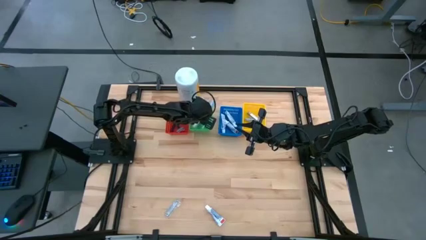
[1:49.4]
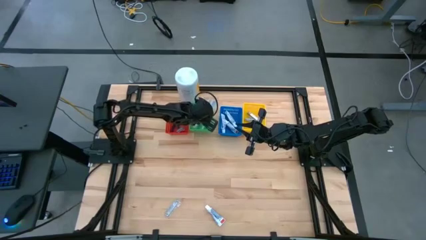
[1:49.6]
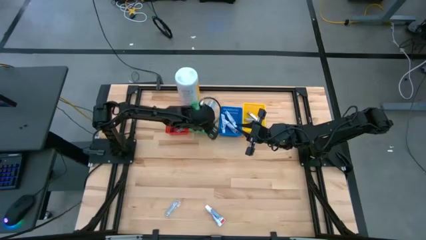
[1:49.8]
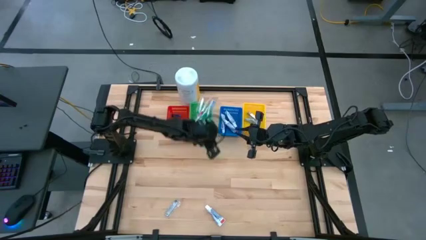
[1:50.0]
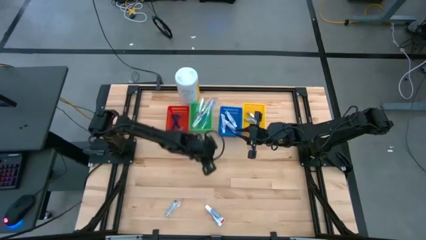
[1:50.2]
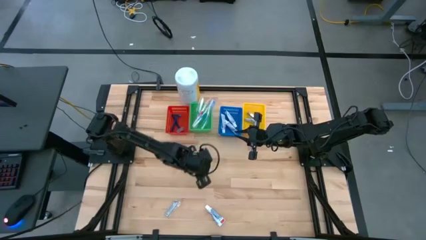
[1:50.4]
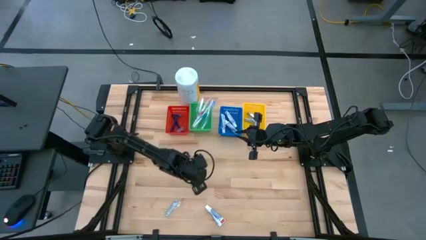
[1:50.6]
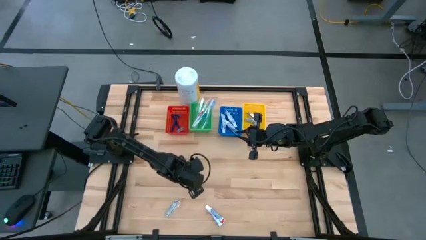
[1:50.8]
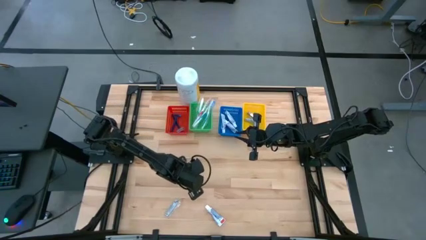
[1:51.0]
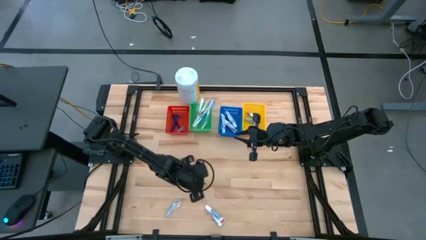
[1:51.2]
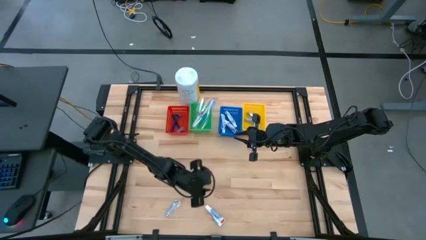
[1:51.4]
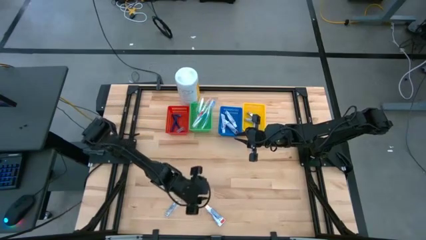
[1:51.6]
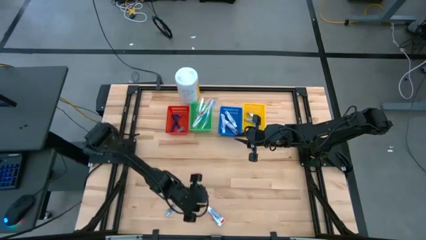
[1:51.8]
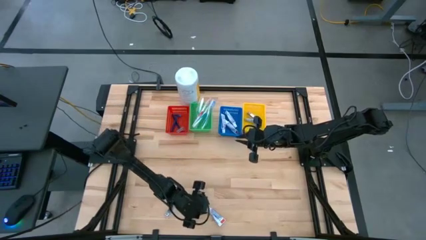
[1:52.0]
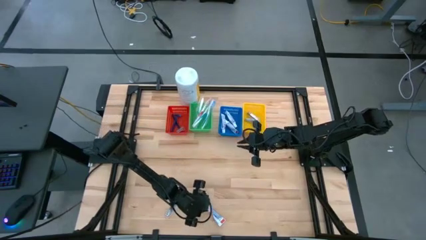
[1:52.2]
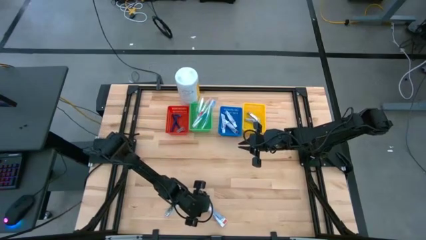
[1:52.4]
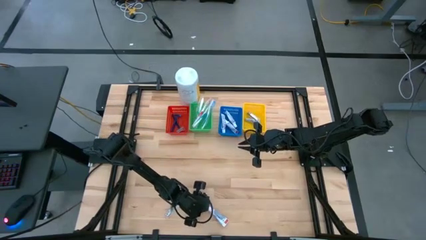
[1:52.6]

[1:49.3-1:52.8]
Task: Pick & Place Travel size toiletries
Put the white toothpaste into the blue bin

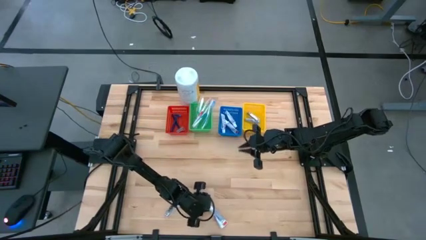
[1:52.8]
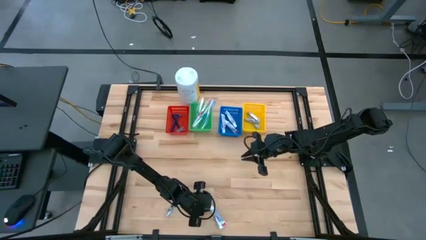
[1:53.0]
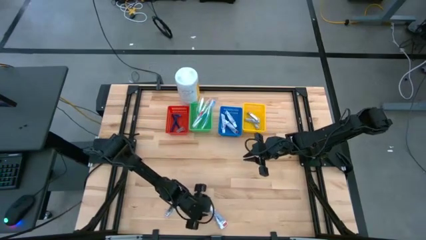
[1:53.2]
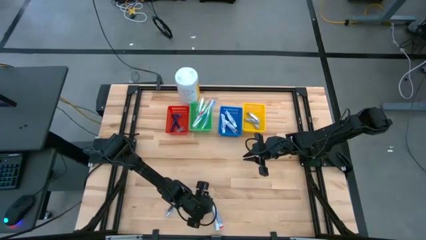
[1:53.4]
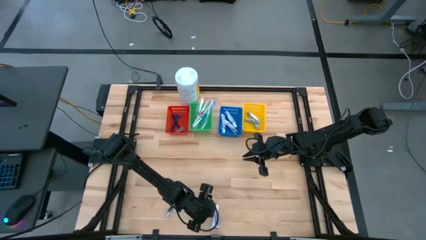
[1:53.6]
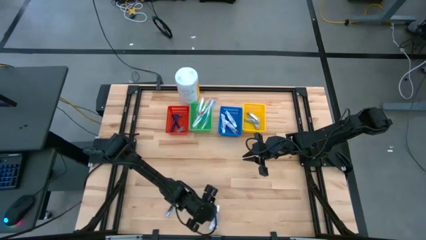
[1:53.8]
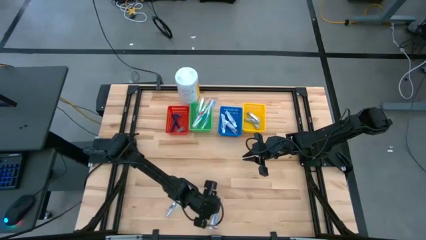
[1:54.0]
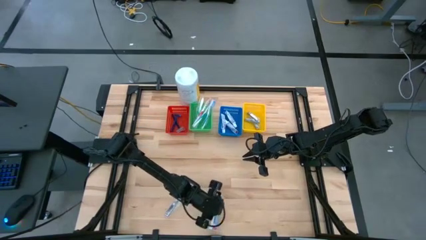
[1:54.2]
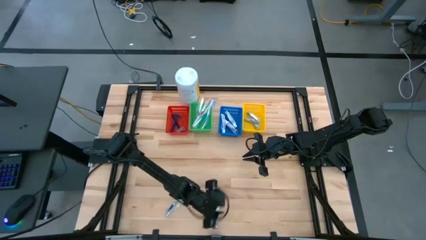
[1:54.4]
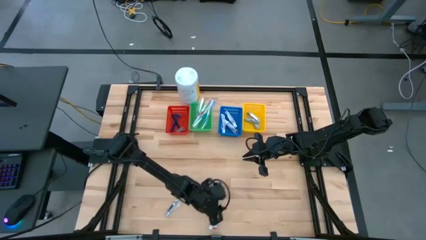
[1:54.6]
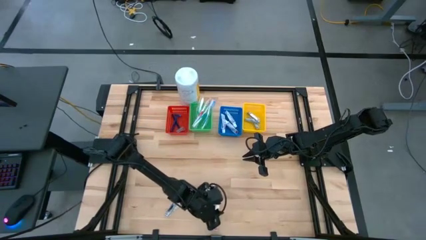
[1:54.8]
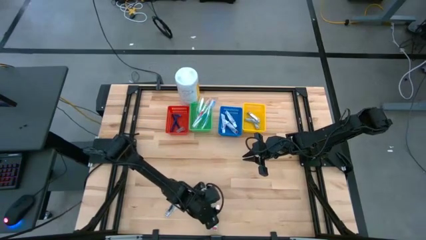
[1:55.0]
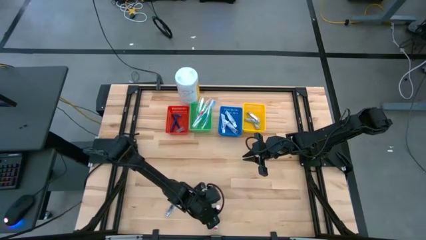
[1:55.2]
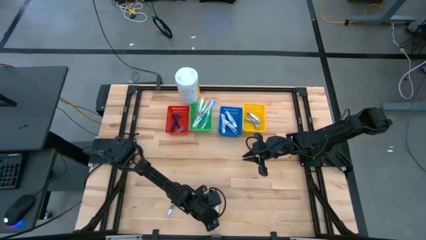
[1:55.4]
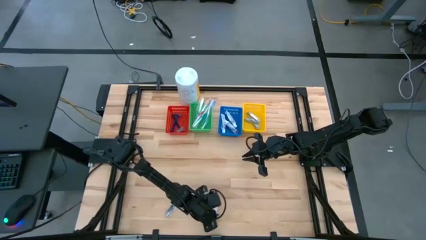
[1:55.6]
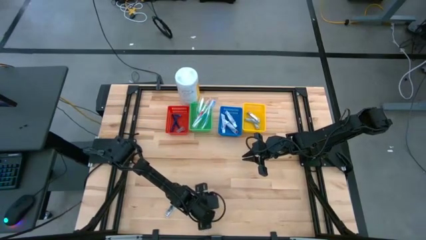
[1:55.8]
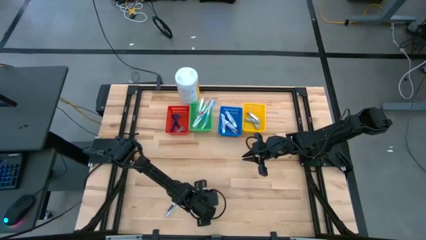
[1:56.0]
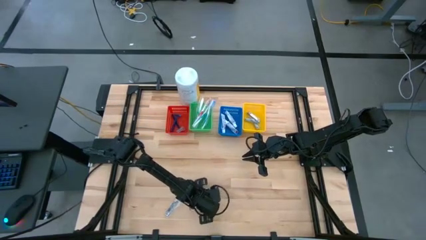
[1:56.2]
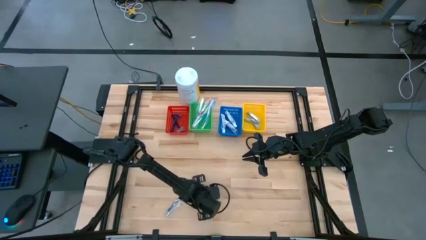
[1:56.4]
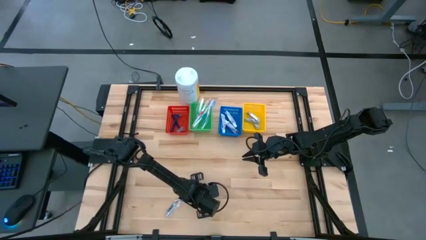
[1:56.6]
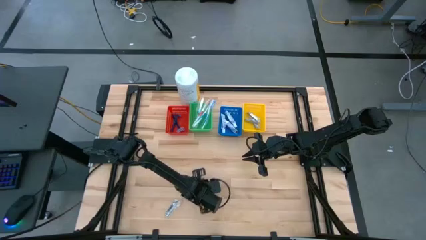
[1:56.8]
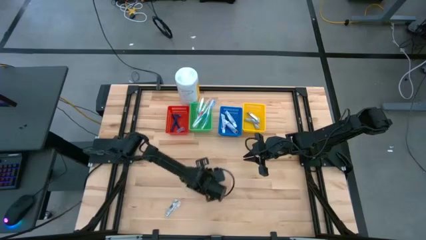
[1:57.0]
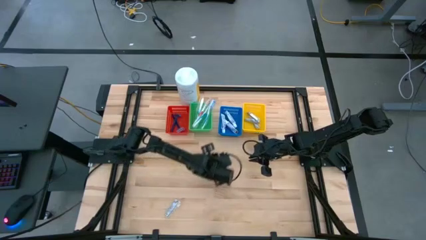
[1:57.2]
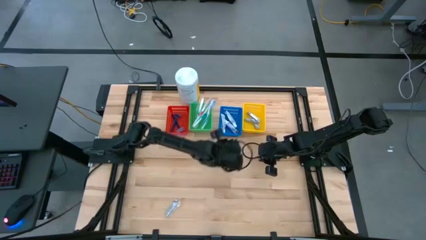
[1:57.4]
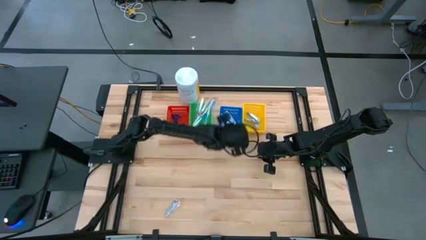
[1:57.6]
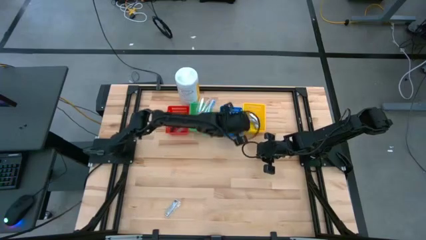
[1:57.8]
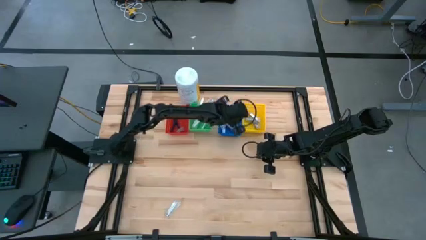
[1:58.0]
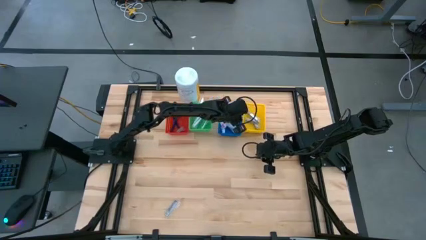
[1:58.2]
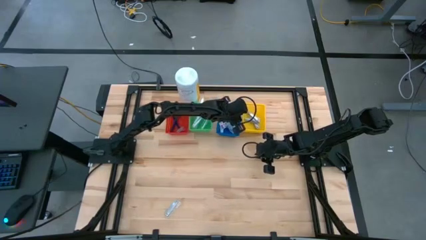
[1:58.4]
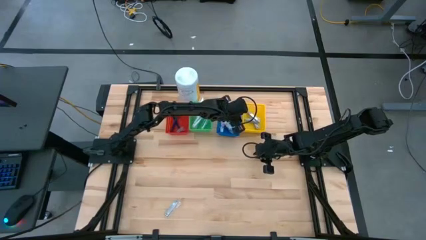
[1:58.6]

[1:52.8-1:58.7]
Put the white toothpaste into the blue bin

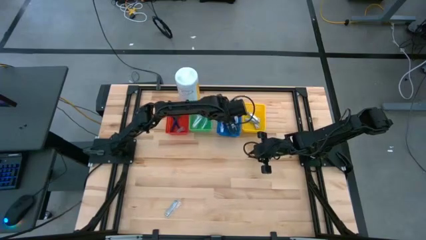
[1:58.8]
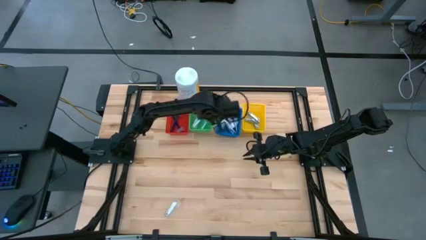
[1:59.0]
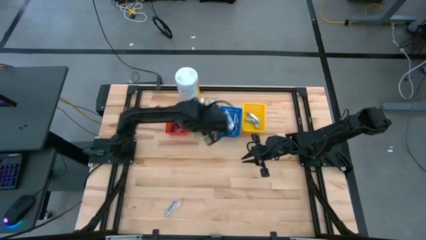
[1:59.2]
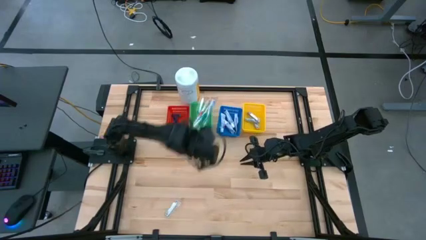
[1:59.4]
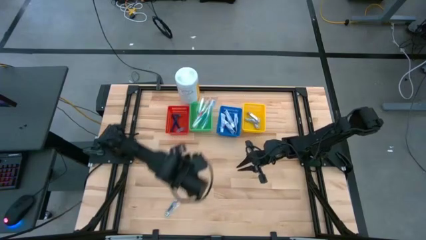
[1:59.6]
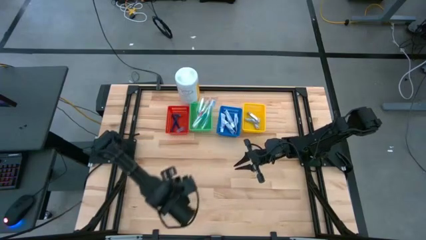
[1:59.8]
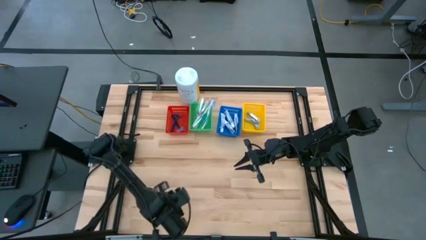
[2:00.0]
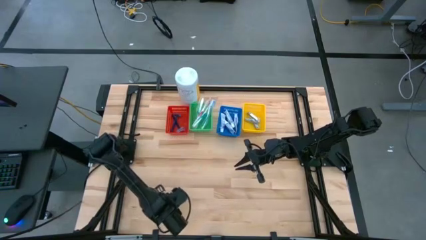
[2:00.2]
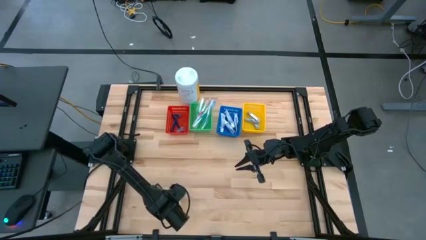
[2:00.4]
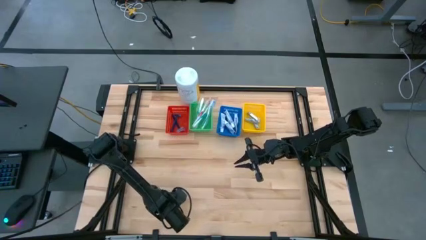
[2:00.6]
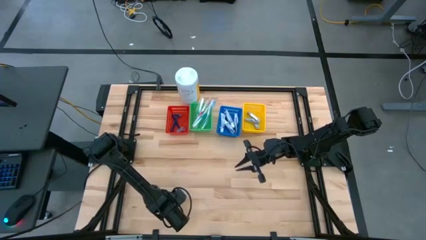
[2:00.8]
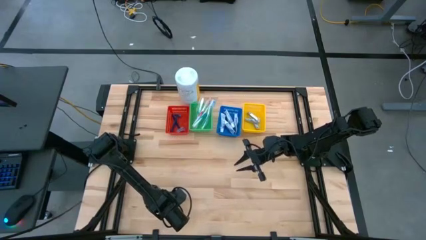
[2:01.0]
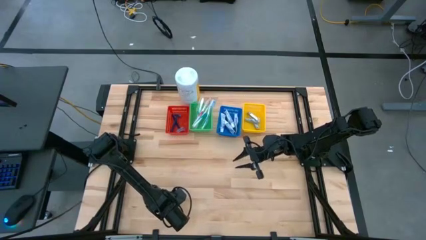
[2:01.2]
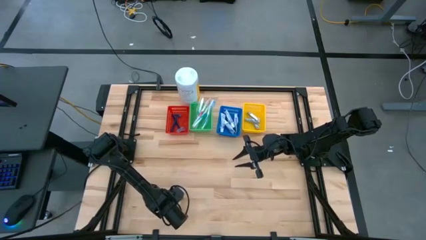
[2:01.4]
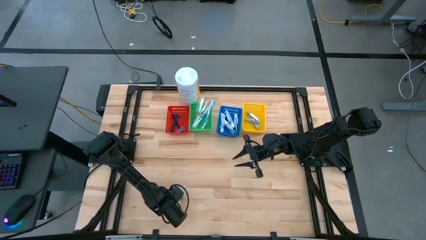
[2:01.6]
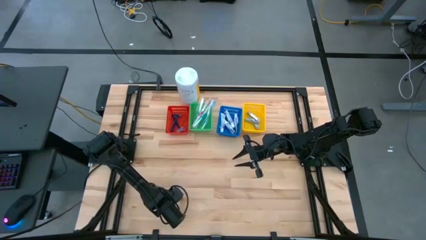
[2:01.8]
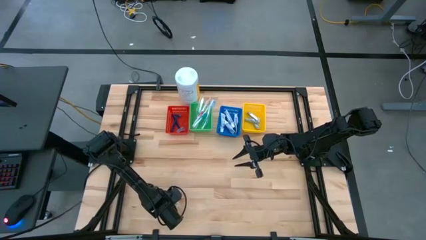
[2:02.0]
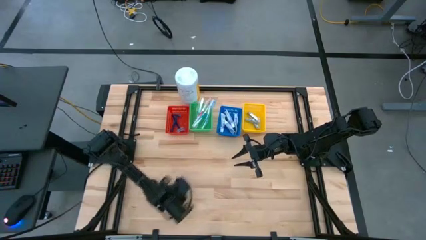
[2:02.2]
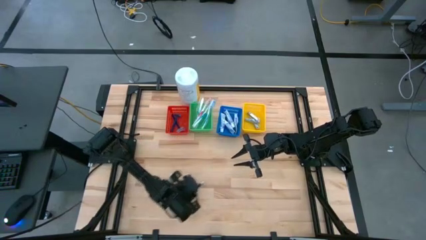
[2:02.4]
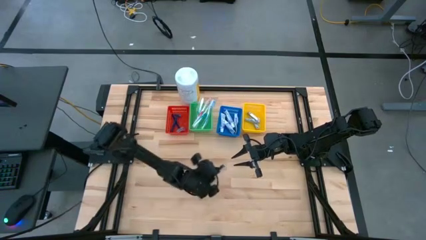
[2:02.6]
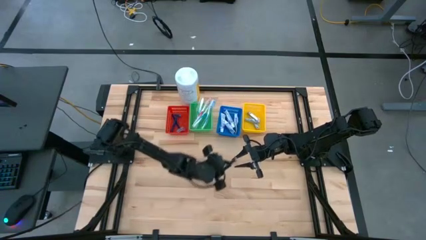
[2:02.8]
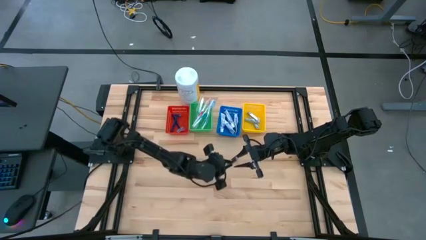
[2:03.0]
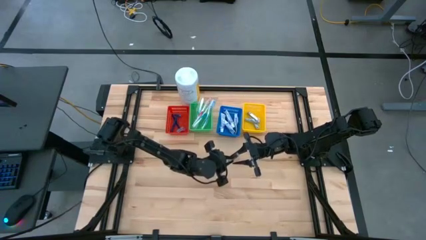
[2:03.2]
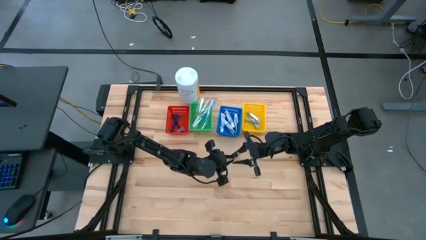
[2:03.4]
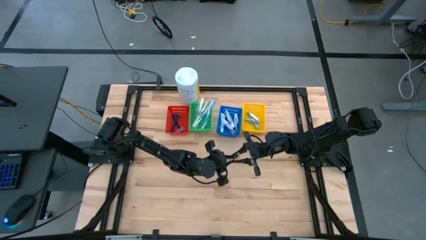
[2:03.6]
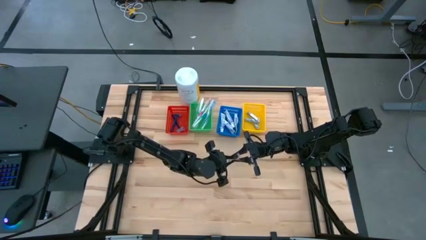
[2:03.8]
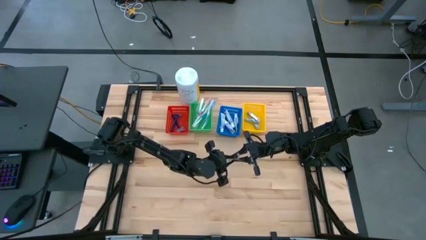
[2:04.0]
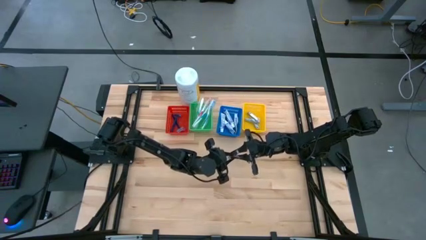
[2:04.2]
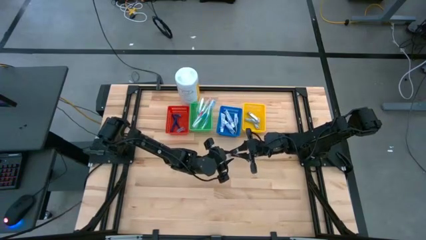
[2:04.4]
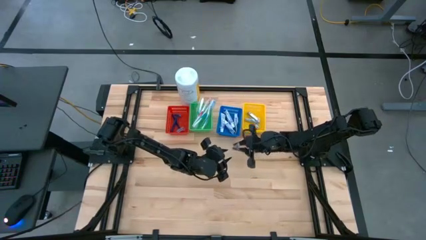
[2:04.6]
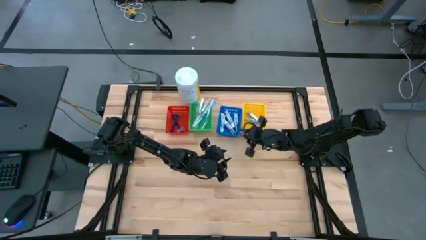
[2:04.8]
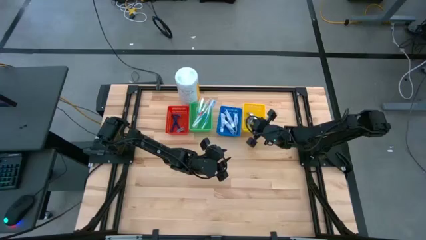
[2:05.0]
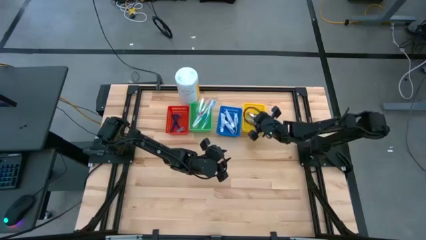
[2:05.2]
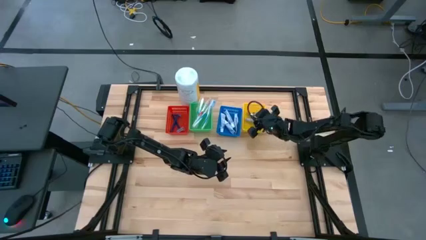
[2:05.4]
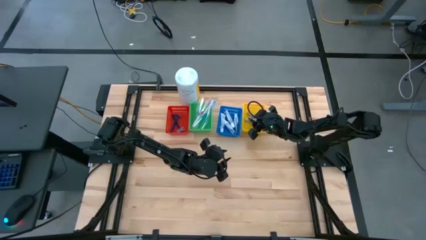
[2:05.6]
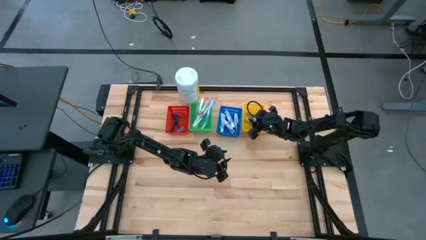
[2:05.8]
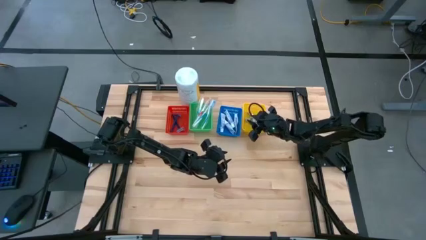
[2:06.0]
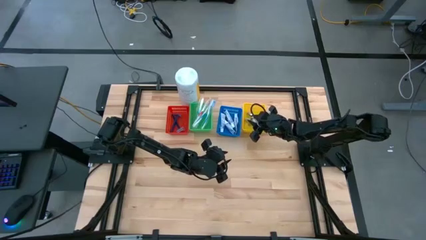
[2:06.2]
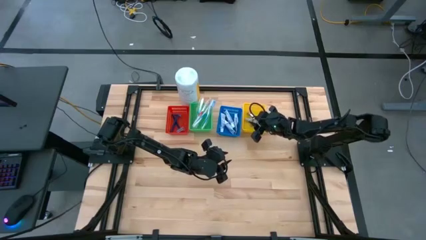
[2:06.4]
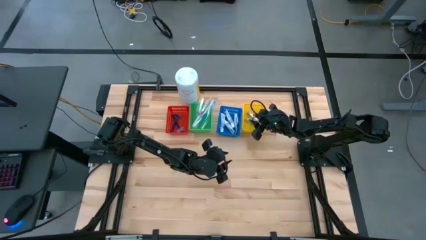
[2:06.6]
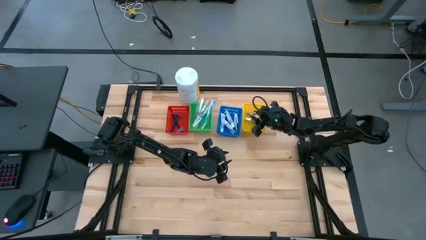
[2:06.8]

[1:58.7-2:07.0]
Put the silver nail cutter into the yellow bin
